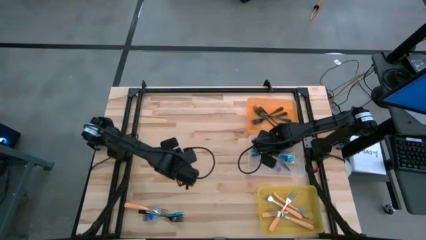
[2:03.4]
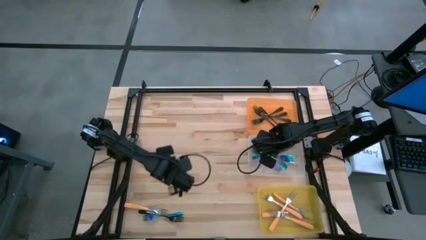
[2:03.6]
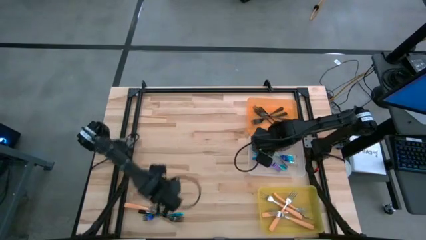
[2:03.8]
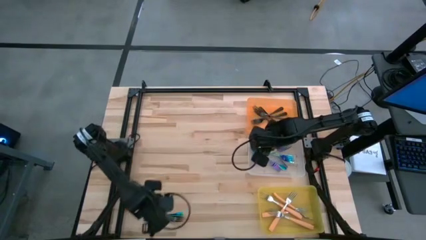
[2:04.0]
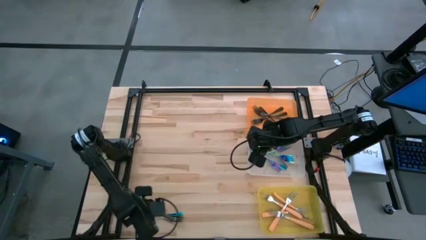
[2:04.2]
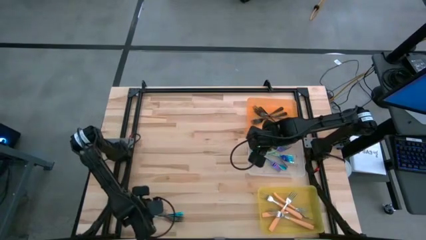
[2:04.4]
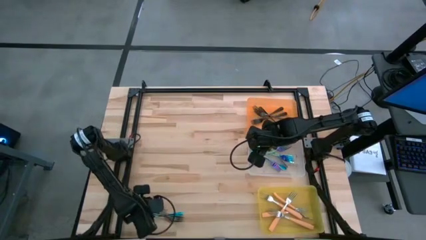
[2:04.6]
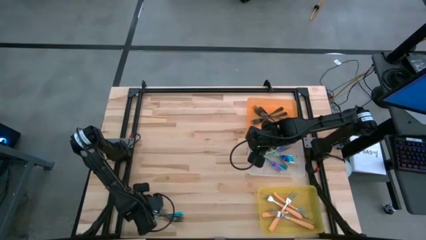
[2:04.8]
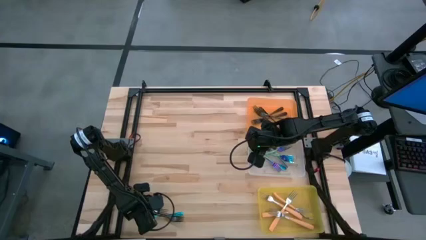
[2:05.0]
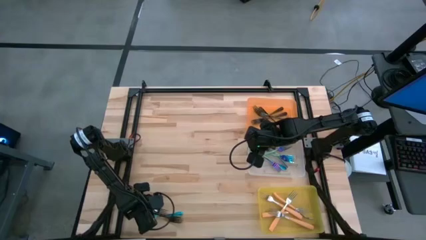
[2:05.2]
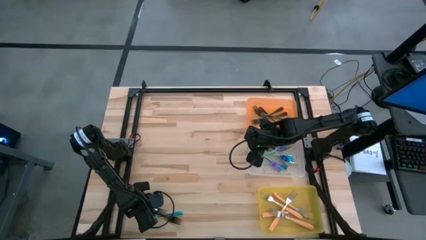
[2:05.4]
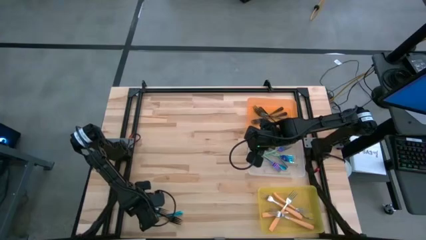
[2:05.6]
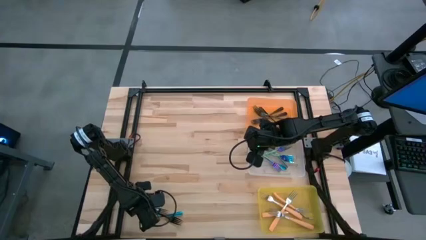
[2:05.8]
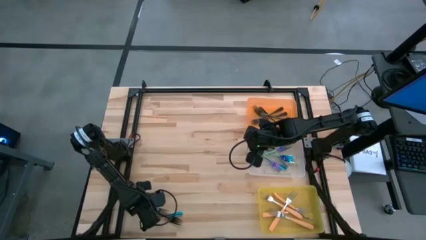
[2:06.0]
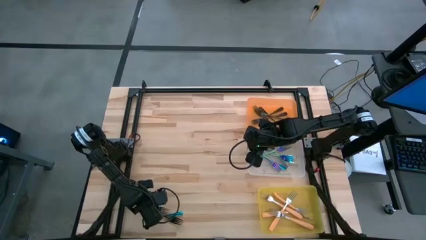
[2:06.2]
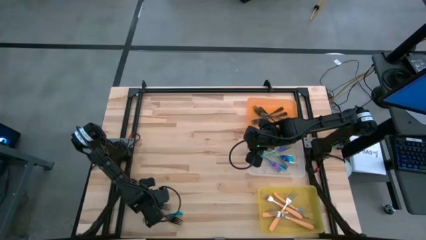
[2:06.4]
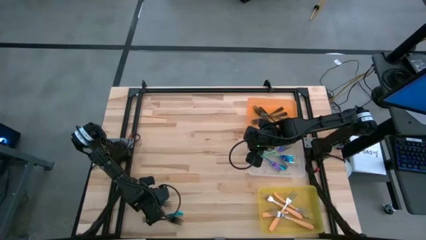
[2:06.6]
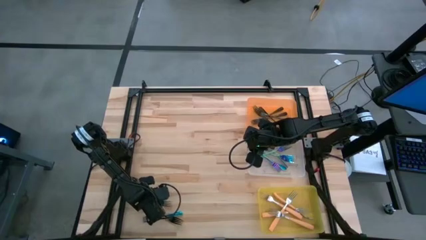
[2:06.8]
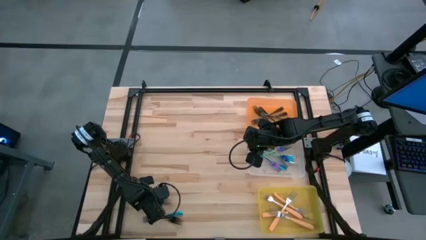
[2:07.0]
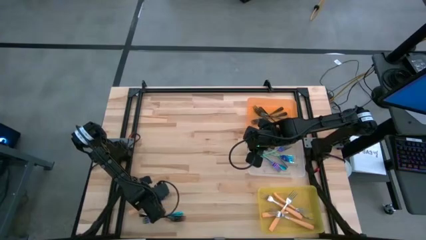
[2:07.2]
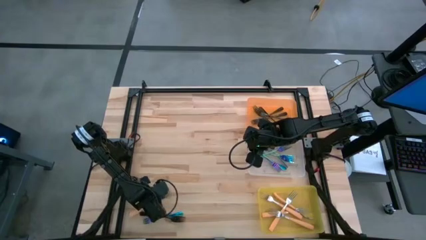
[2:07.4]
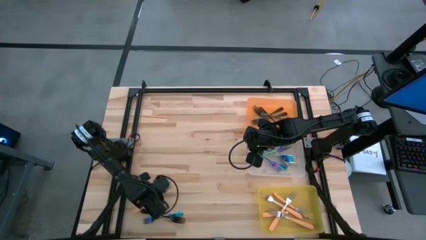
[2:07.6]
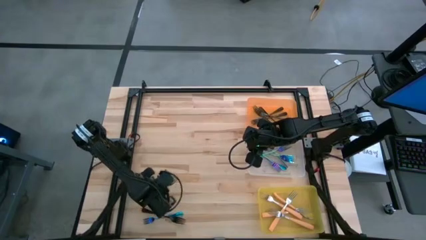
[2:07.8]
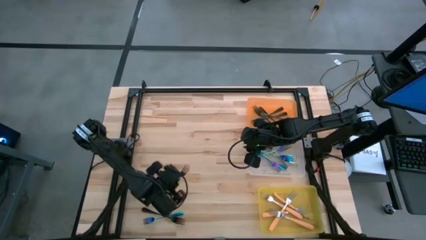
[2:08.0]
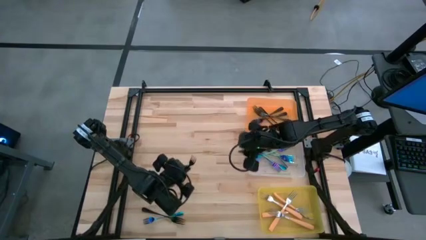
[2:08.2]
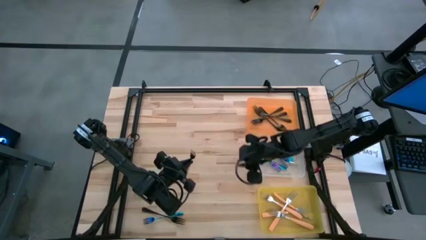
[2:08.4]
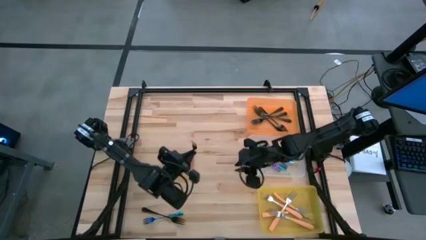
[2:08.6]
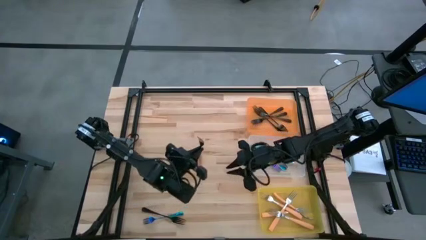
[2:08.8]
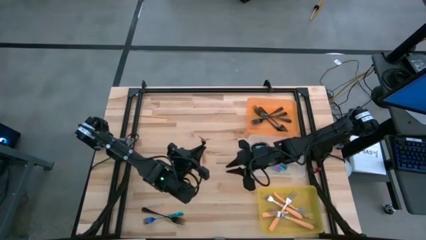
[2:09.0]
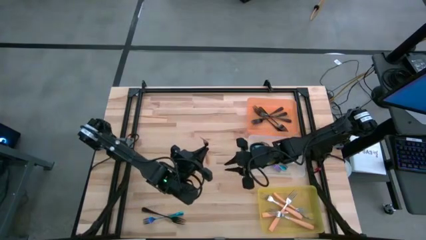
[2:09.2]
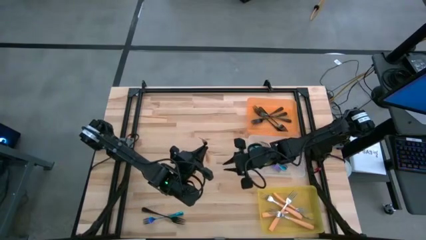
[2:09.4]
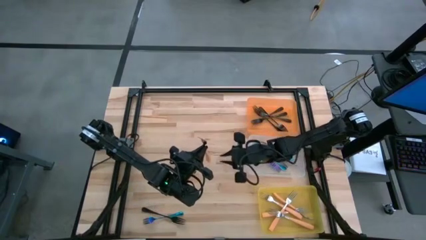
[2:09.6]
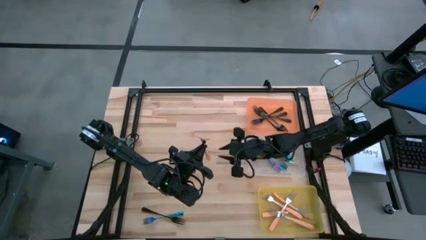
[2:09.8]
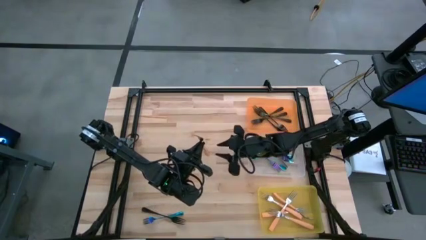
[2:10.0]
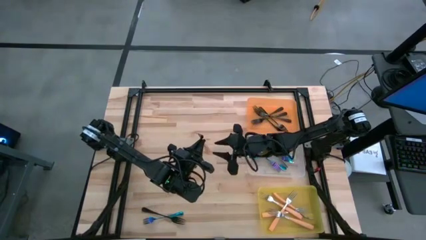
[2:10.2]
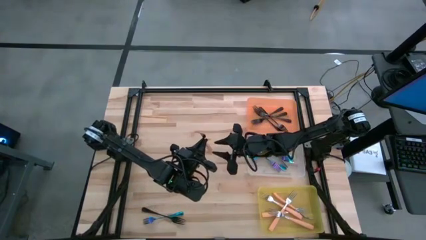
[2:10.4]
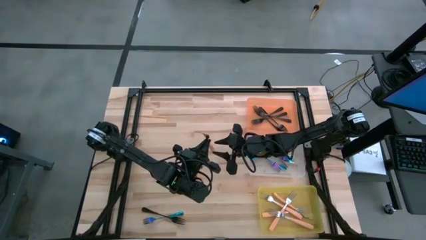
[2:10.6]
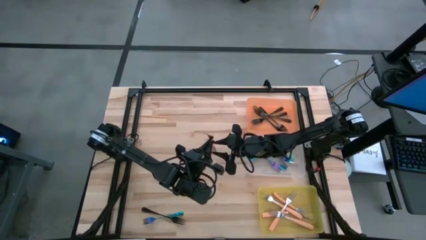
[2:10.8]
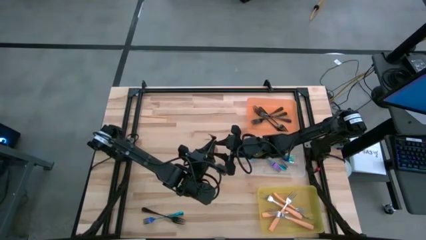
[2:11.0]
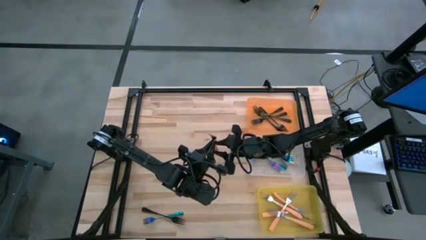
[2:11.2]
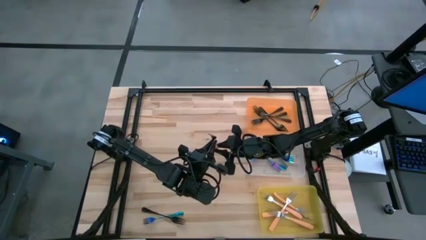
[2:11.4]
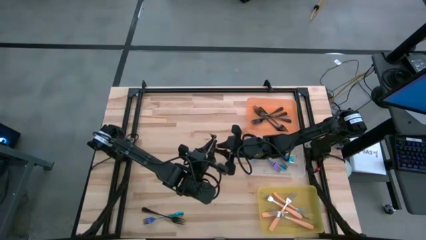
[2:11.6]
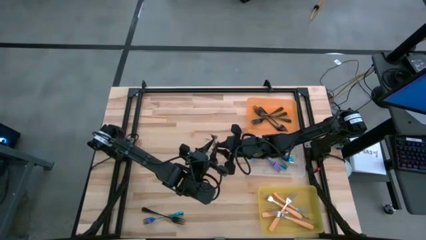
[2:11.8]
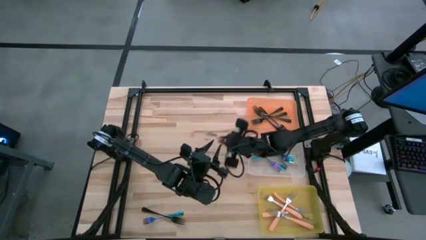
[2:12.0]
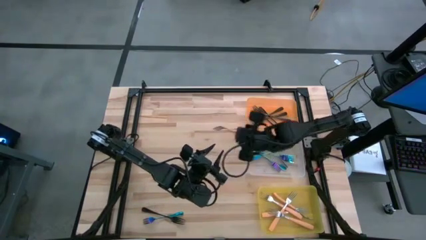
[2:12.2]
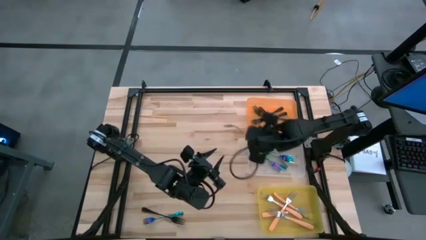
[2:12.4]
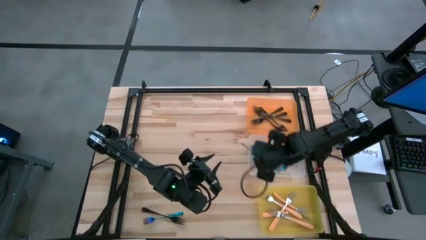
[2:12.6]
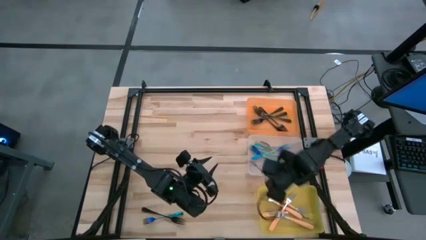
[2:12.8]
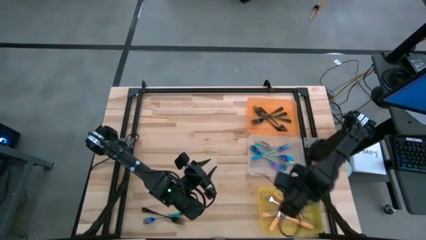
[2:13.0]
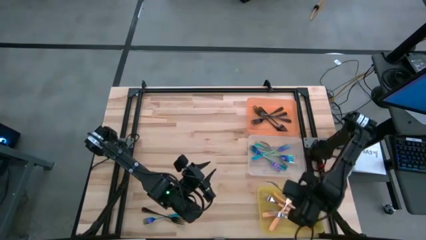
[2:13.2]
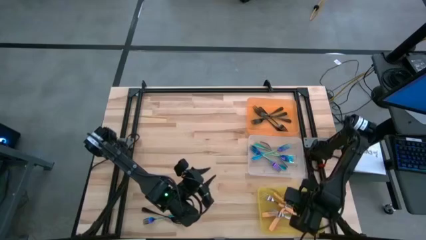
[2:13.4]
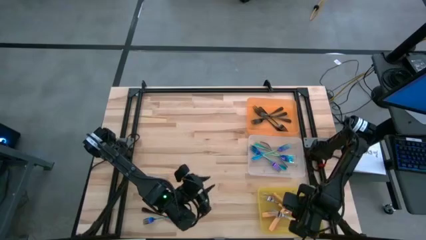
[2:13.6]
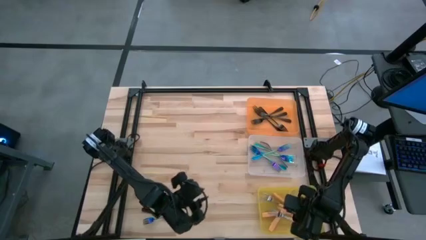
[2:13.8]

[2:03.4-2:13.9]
Task: Sort silverware by color (type)
Put the orange fork into the yellow bin

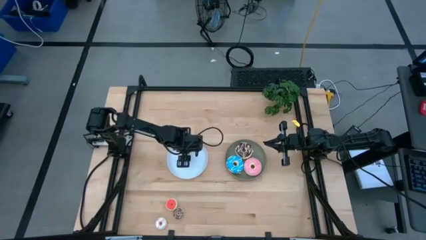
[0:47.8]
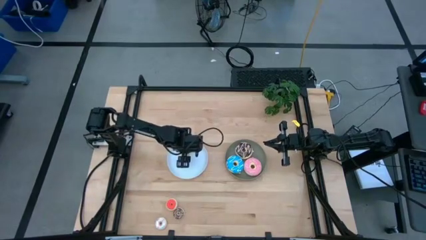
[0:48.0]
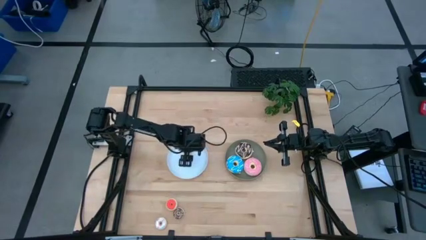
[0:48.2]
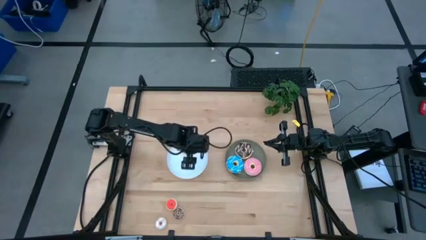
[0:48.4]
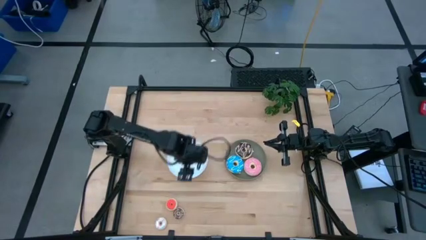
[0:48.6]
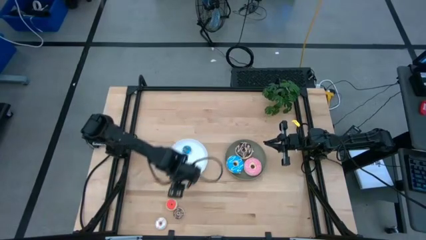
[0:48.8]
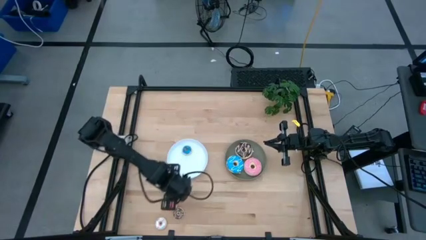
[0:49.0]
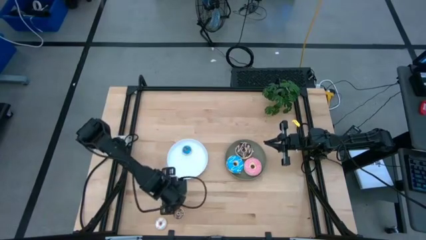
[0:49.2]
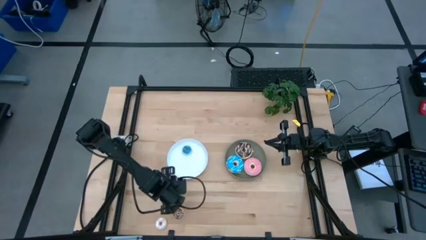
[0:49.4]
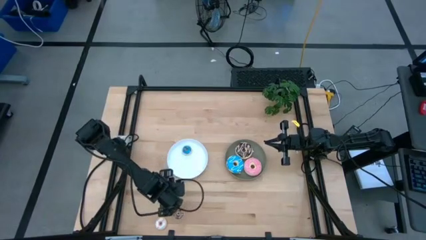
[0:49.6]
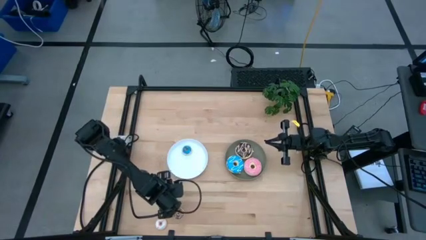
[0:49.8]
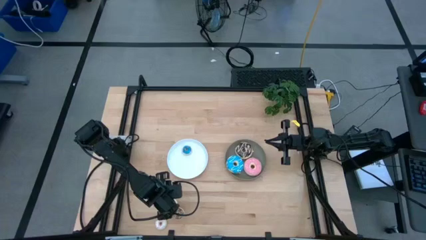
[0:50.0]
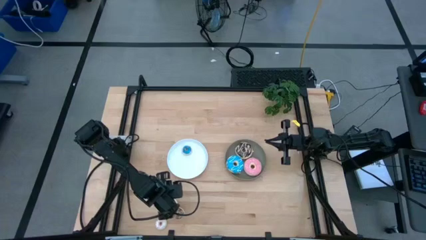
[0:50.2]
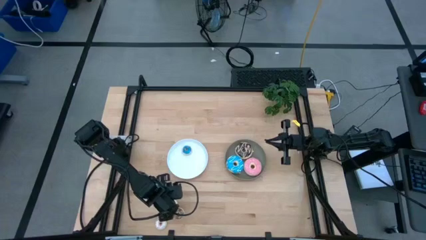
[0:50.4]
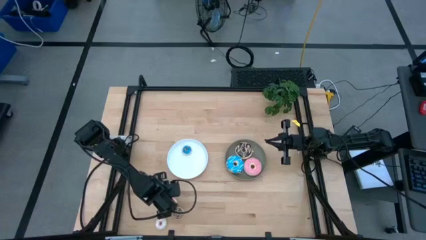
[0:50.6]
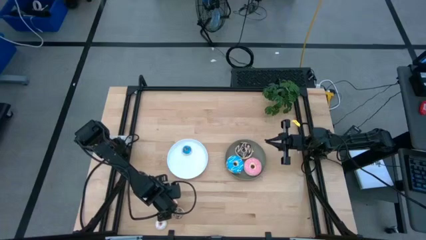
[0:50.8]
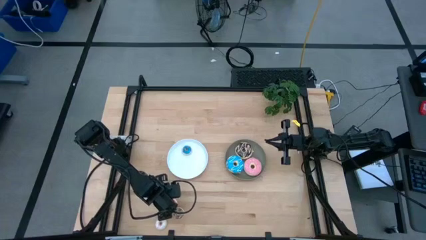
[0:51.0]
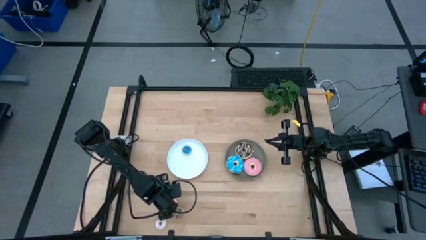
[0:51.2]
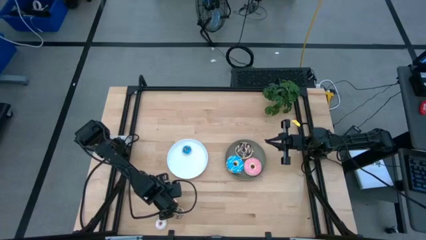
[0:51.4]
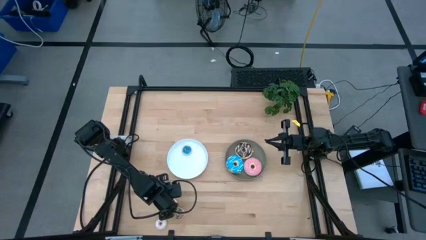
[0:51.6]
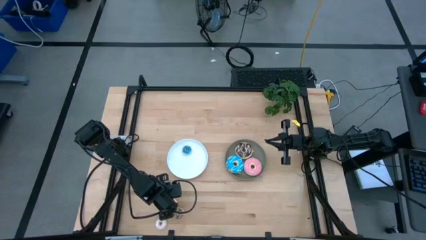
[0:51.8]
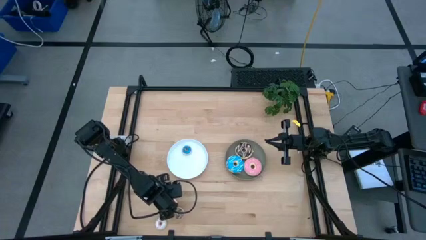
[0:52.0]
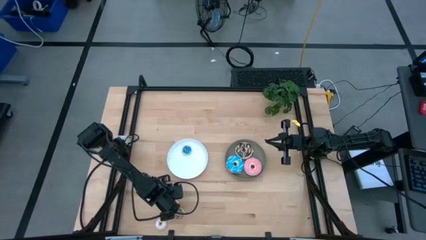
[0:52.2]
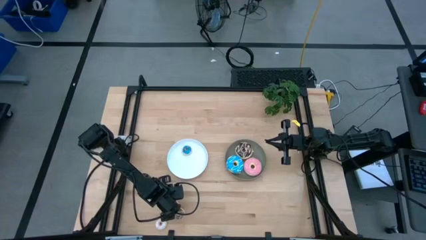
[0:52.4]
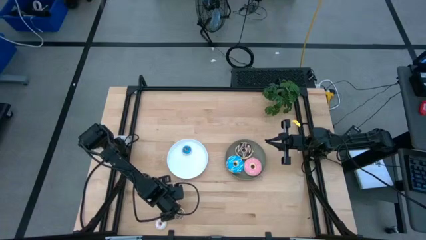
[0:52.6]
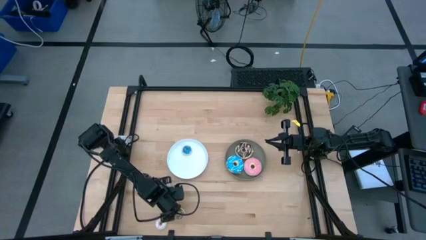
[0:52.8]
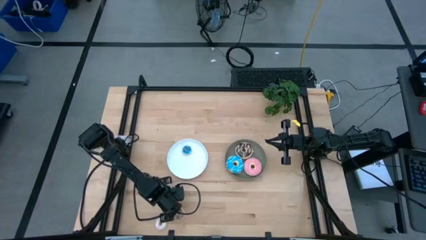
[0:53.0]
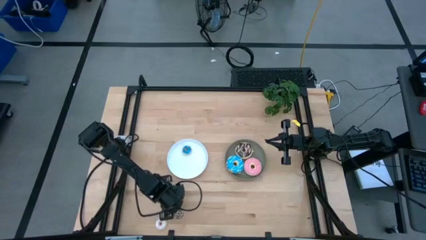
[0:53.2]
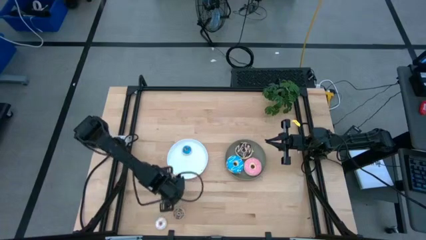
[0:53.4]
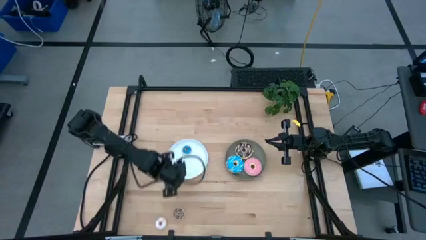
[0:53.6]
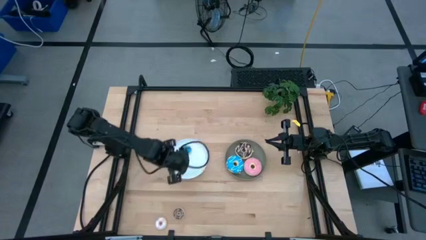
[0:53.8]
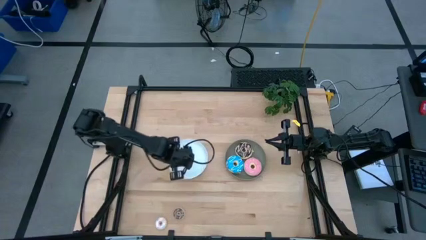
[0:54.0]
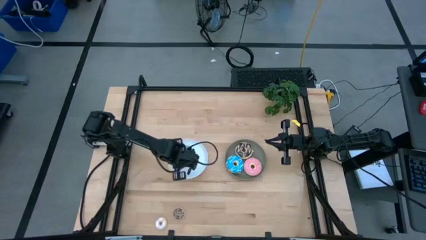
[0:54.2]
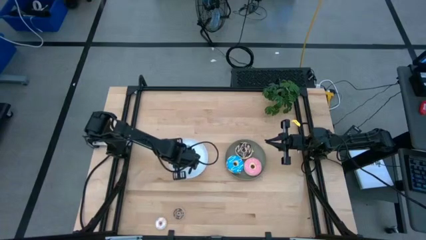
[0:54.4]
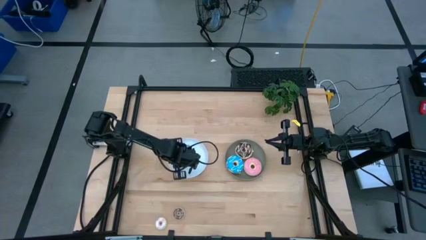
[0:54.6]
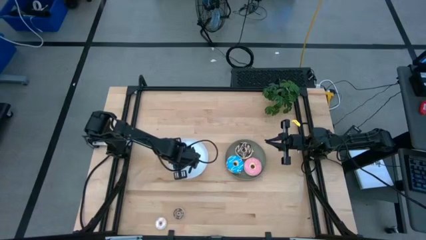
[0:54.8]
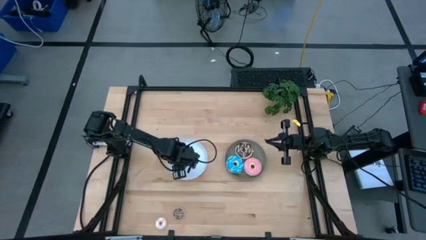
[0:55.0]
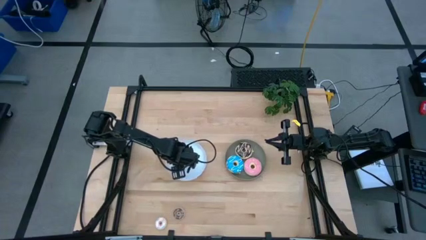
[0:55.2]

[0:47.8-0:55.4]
Task: Pick & Place donuts
Put the small orange donut on the white plate
